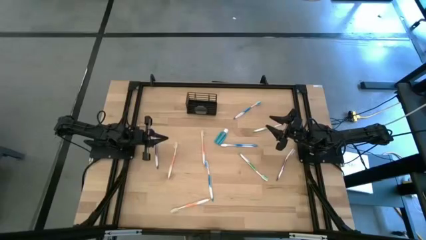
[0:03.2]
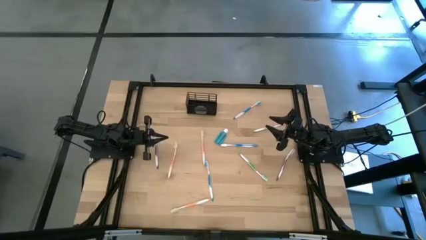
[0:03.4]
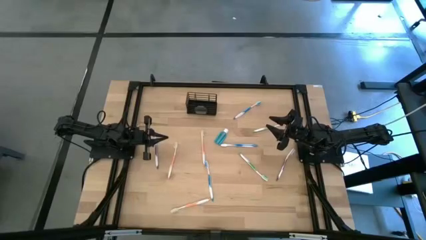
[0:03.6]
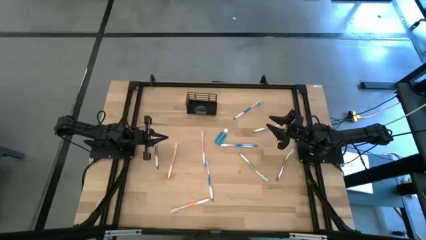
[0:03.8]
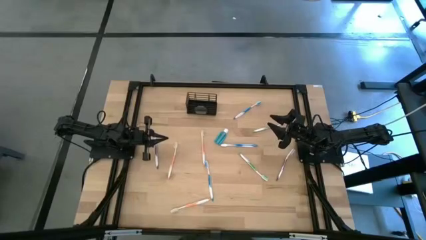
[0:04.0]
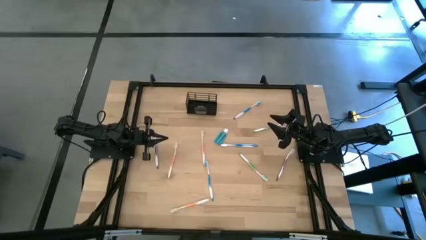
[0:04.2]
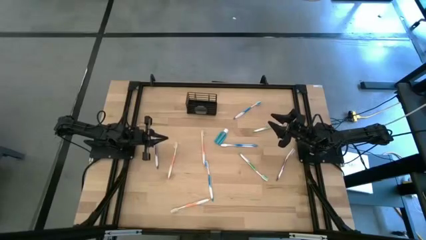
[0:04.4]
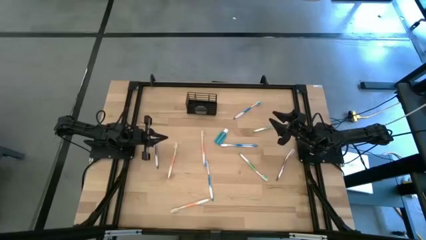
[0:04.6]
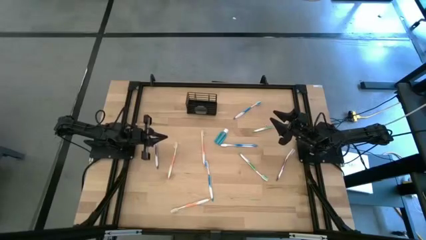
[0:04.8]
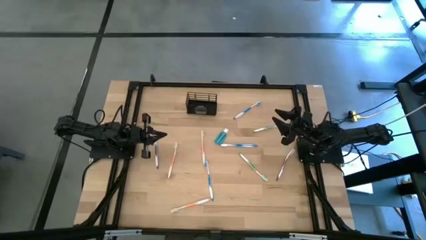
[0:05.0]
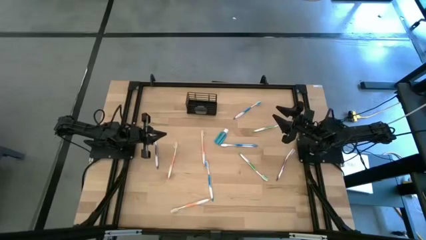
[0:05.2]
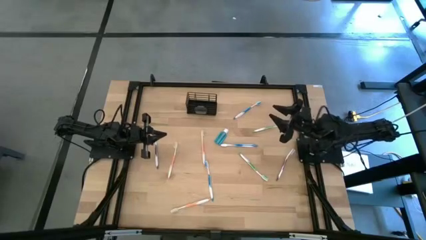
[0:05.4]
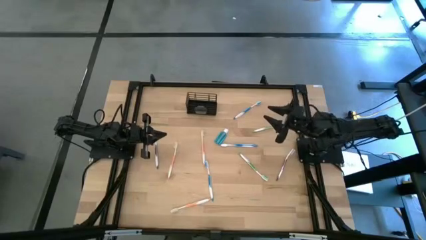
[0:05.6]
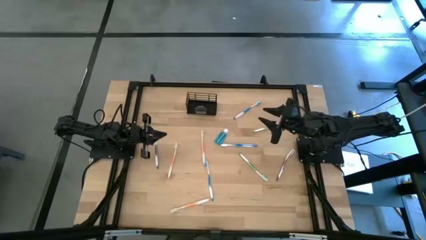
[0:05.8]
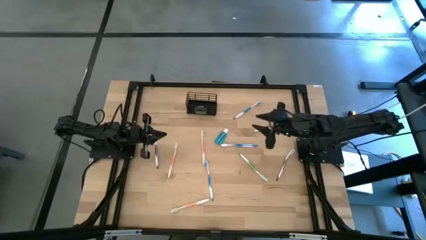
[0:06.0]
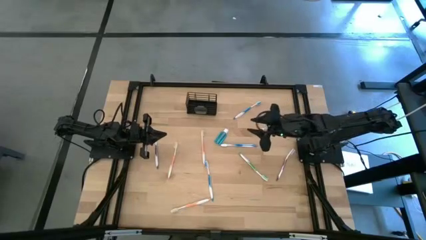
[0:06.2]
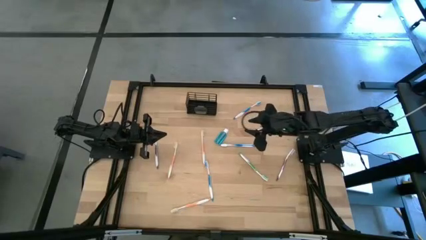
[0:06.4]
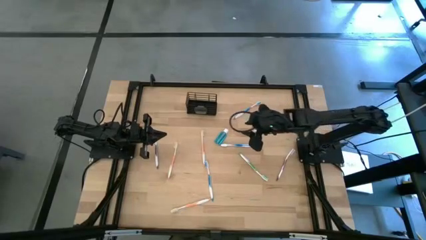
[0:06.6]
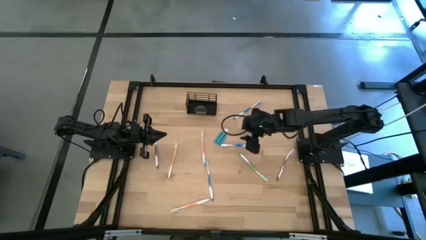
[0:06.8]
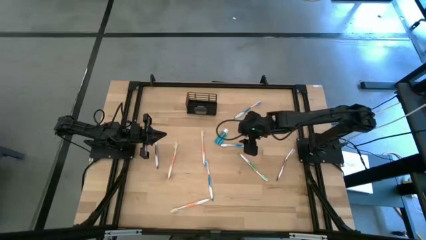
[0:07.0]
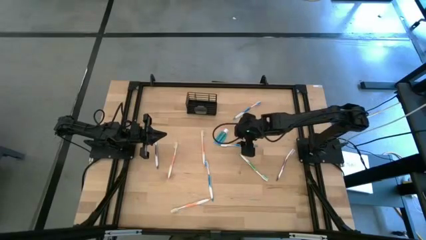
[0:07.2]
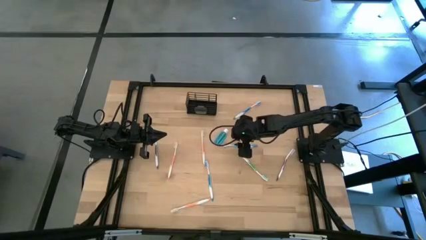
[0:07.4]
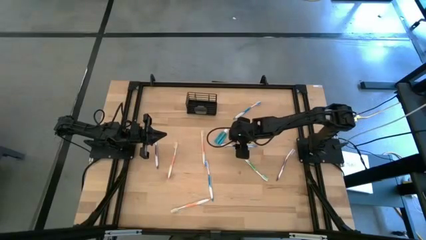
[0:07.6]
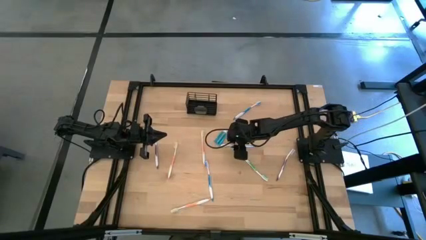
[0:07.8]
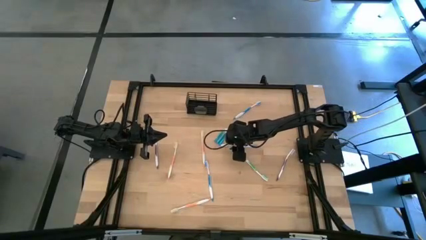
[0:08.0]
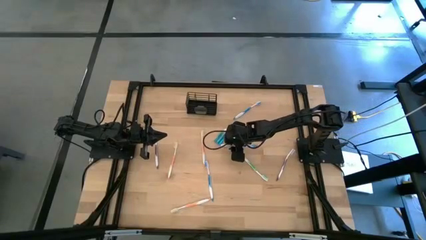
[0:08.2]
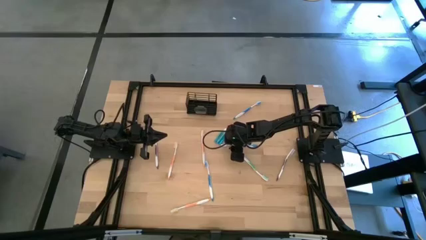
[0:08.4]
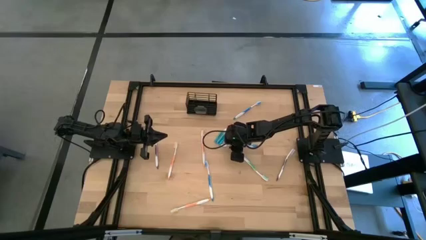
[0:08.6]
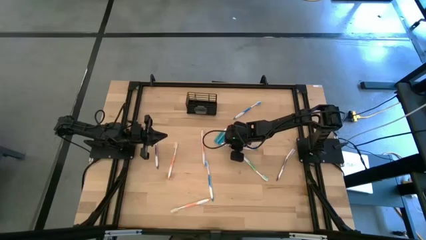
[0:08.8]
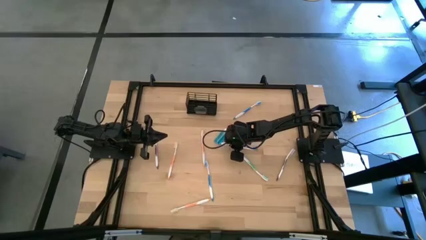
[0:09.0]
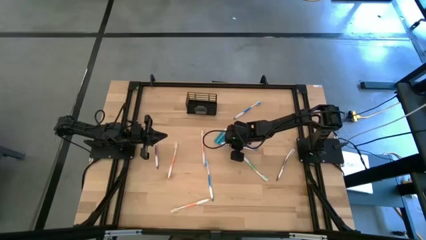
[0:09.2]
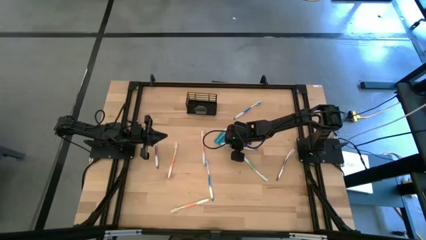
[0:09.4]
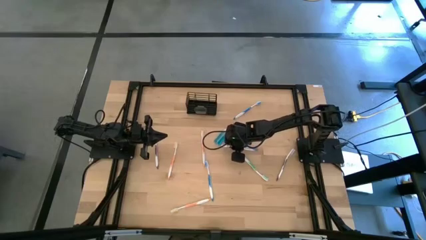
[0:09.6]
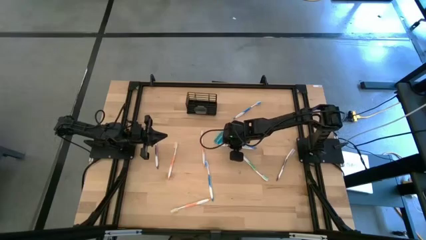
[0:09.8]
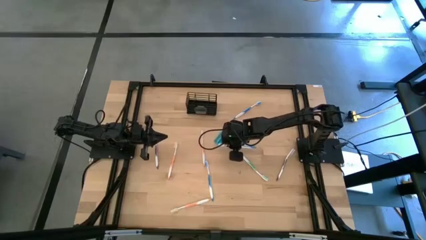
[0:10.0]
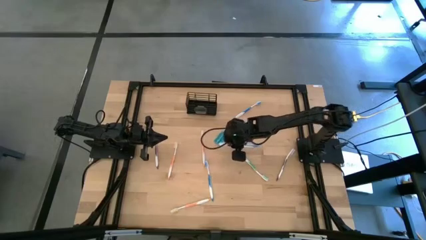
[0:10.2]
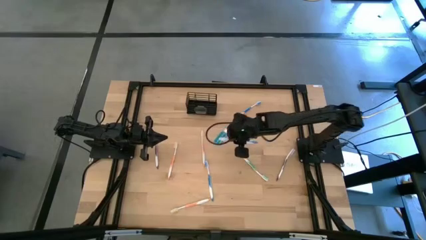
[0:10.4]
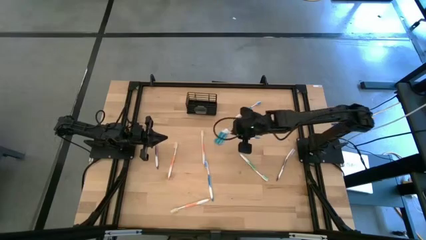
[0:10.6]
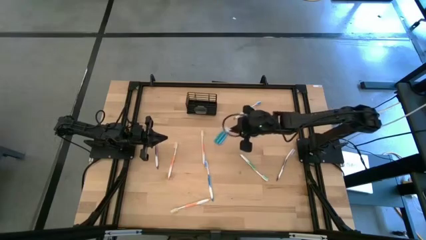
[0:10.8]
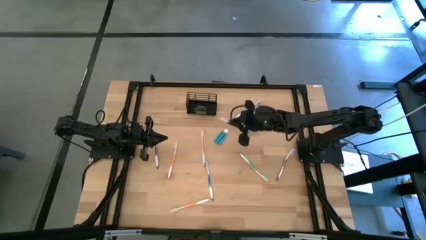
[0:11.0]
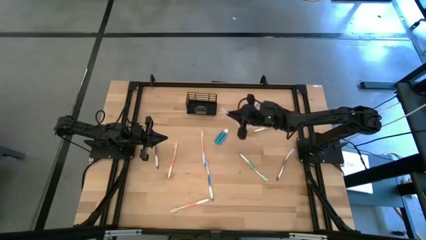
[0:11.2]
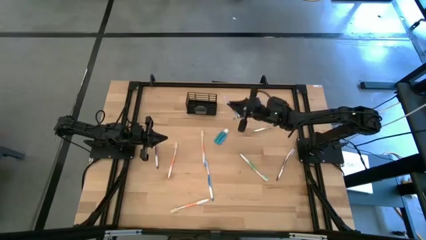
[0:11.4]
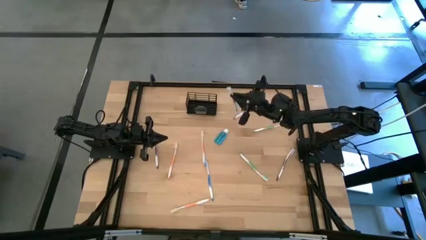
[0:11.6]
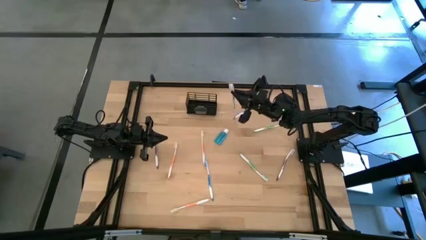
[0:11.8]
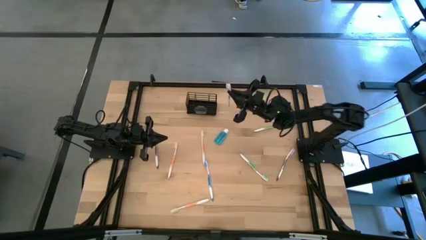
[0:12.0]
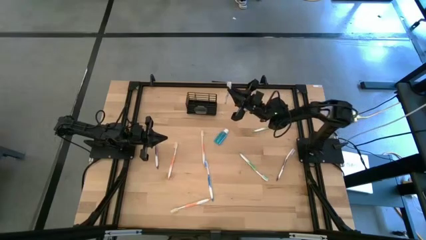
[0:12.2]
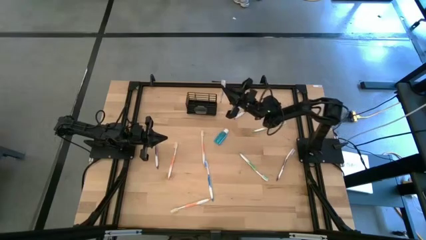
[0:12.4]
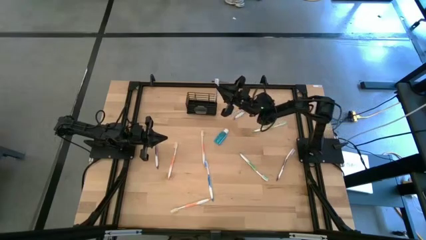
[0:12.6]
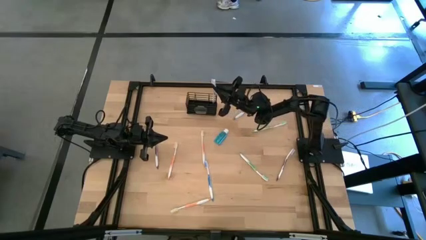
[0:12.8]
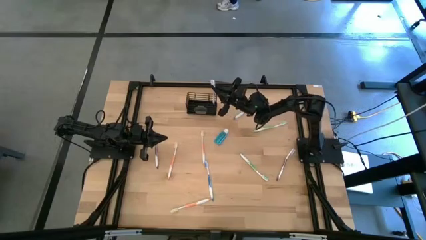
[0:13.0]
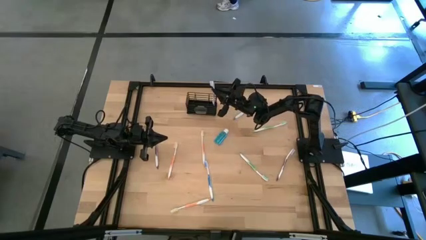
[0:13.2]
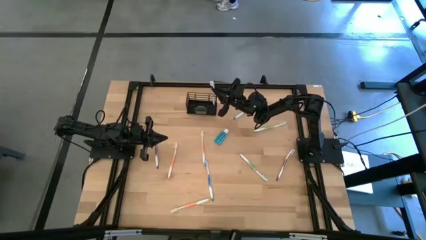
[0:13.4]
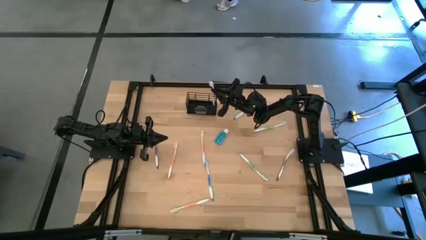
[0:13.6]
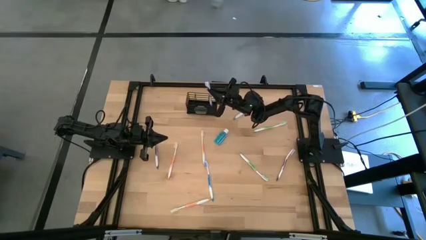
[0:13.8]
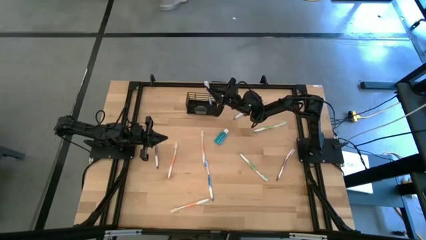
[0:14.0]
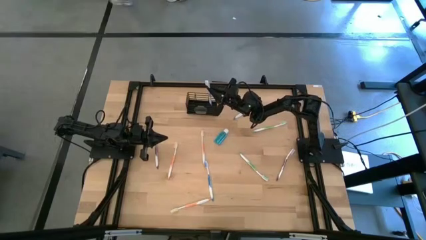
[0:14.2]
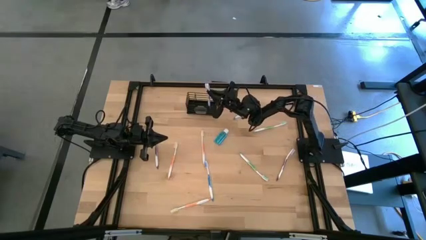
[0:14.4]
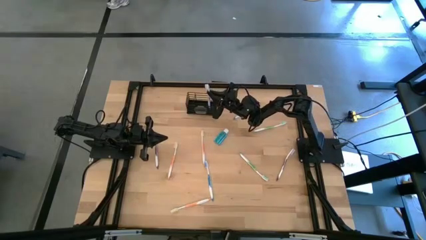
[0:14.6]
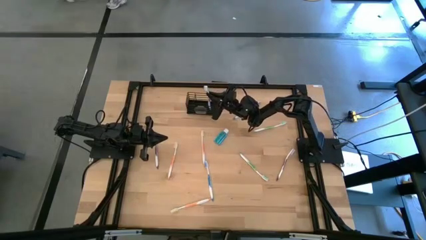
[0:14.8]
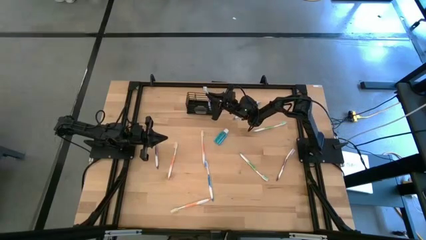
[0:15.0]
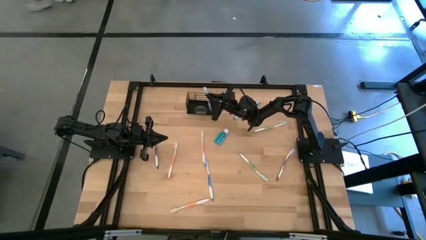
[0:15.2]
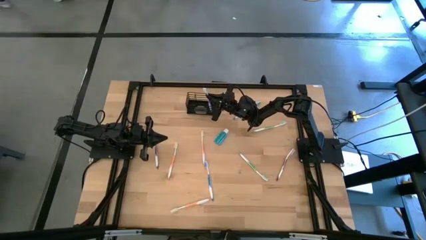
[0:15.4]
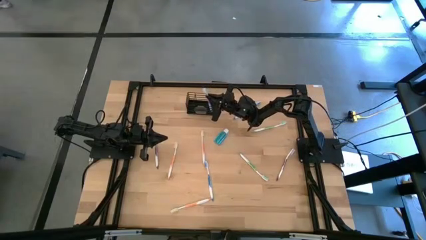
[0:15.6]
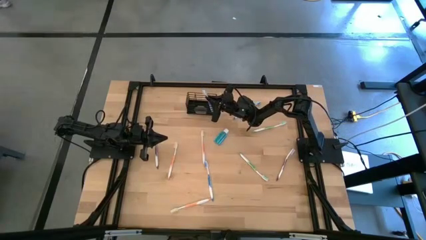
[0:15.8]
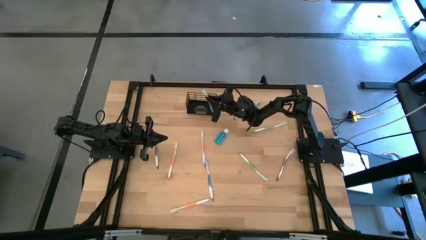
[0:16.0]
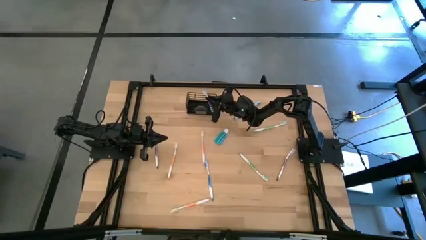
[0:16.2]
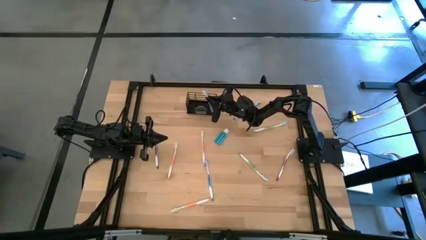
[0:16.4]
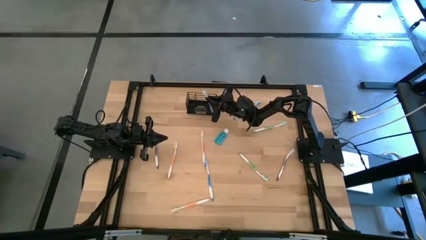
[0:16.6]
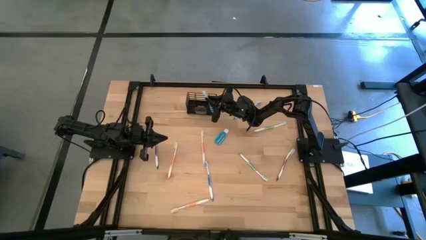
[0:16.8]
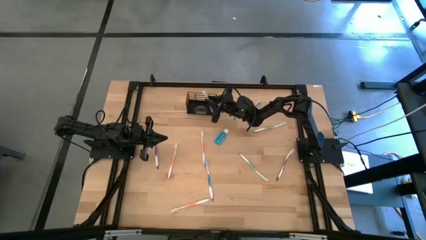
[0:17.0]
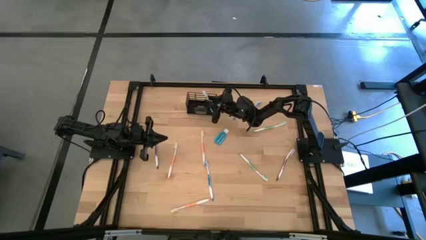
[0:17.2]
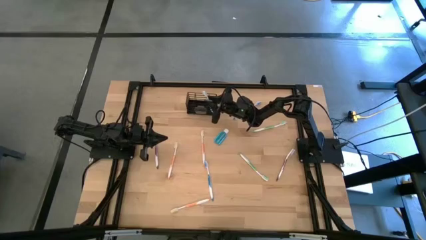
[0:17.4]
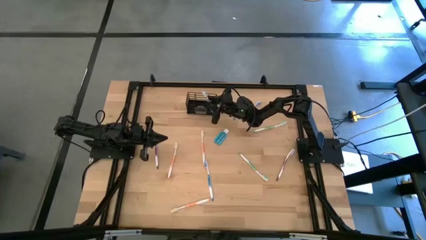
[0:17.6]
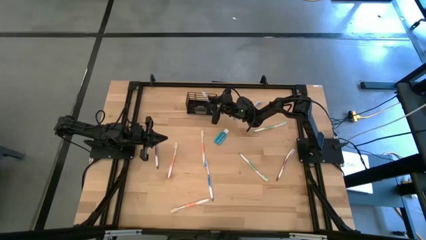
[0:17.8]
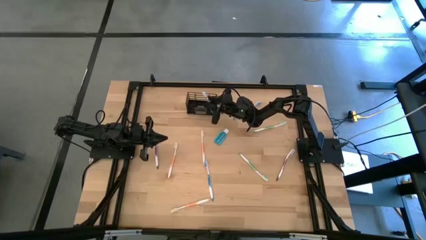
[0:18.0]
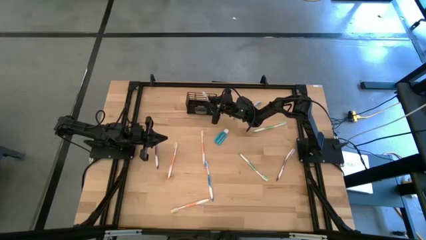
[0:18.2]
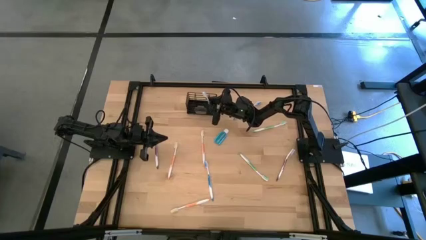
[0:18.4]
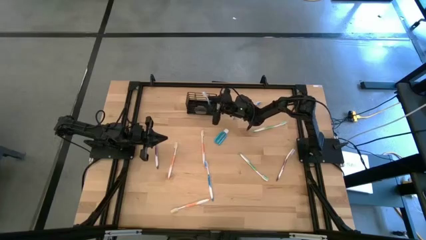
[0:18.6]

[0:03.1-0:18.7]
Task: Pick & Place toothbrushing station
Put the middle blue toothbrush into the black wire organizer
